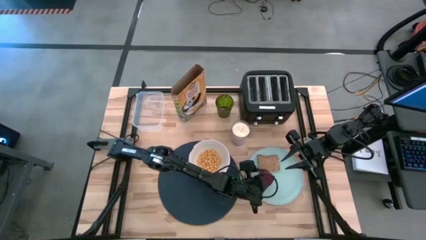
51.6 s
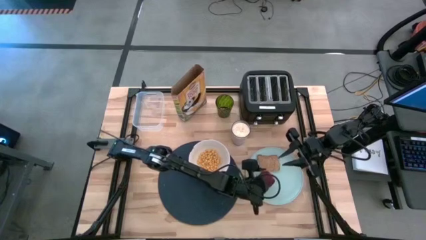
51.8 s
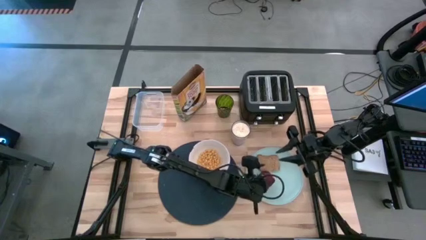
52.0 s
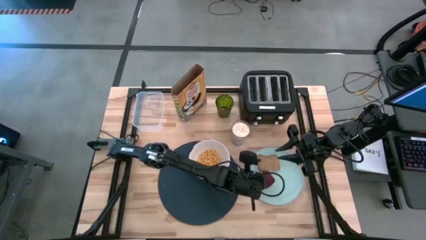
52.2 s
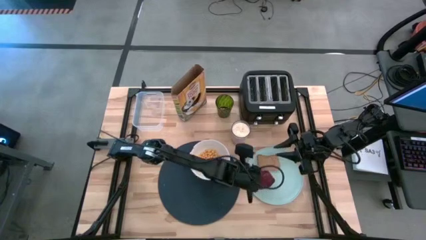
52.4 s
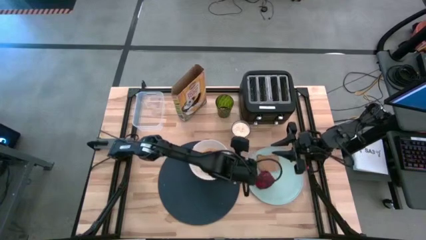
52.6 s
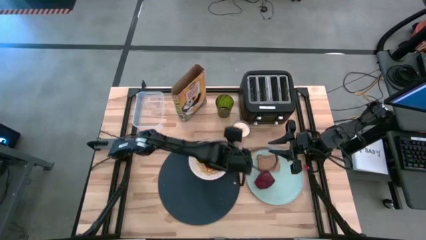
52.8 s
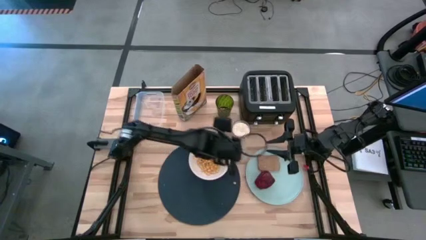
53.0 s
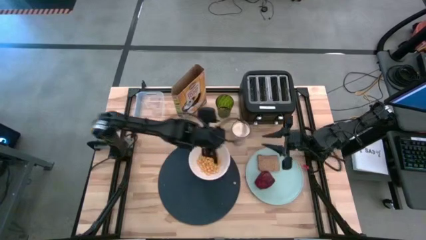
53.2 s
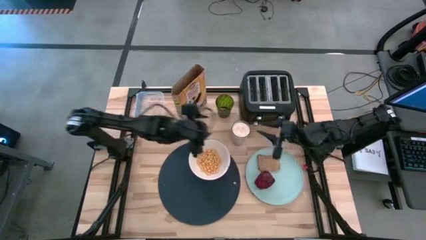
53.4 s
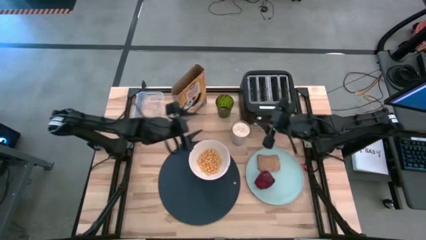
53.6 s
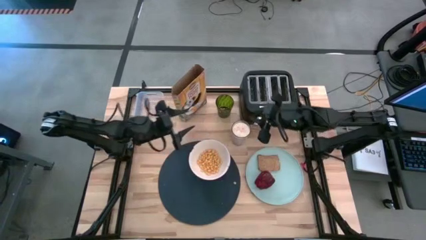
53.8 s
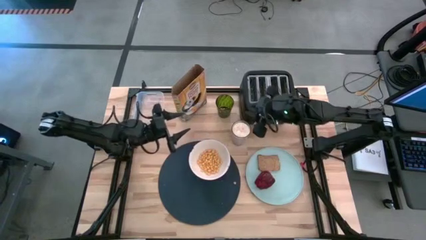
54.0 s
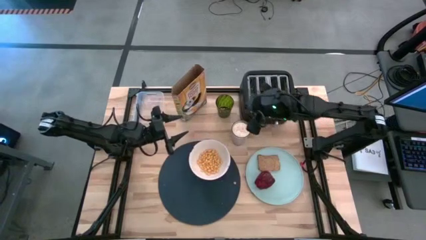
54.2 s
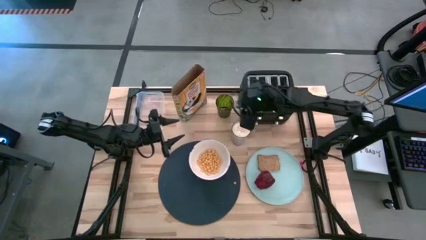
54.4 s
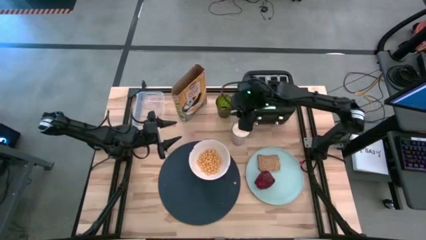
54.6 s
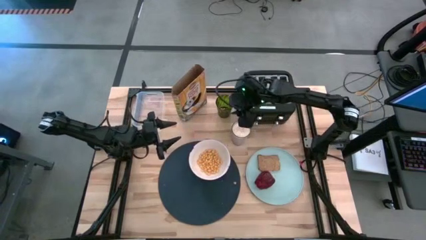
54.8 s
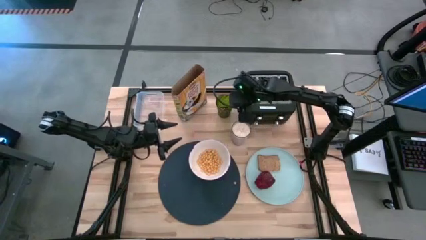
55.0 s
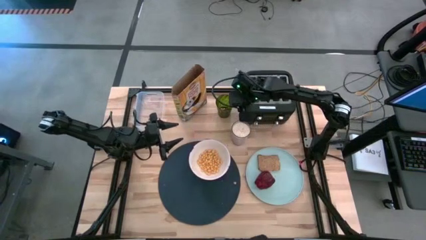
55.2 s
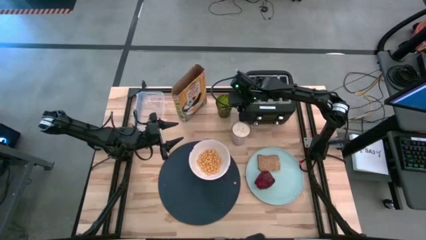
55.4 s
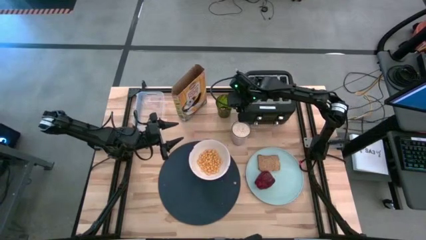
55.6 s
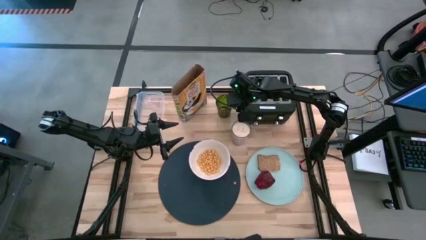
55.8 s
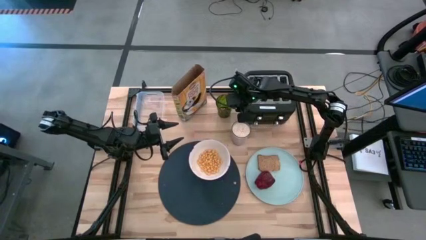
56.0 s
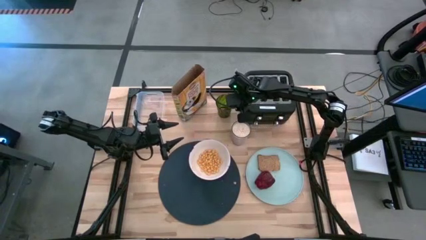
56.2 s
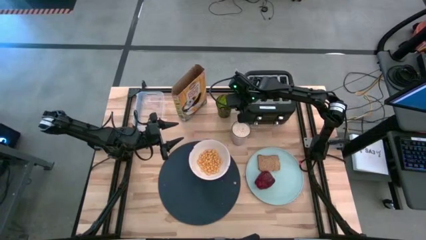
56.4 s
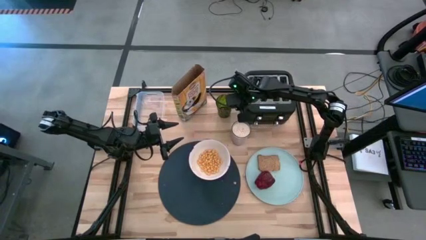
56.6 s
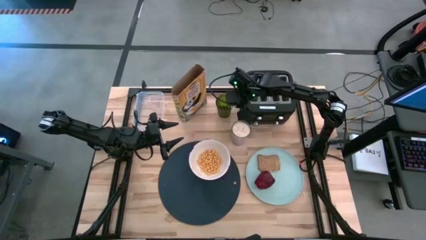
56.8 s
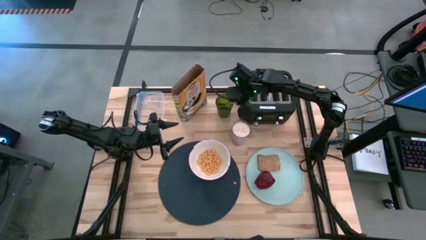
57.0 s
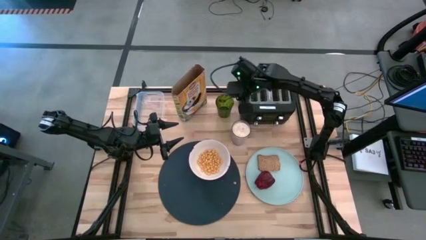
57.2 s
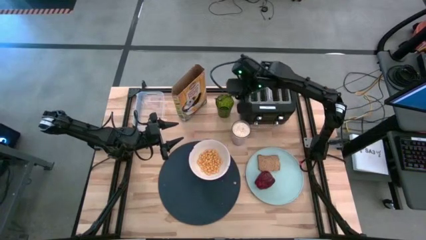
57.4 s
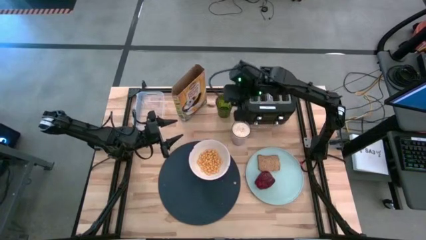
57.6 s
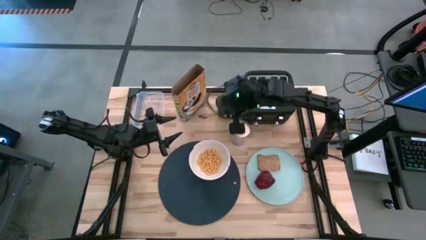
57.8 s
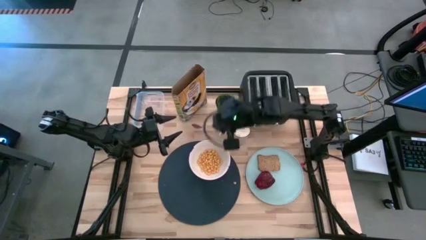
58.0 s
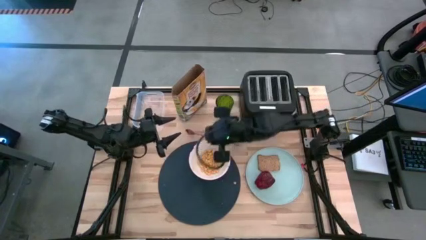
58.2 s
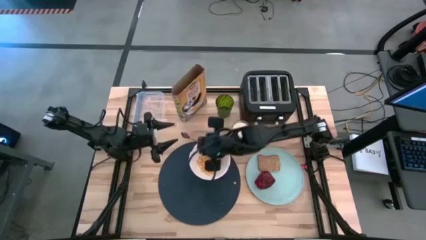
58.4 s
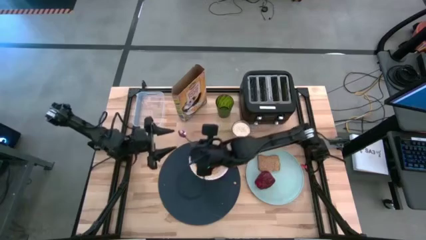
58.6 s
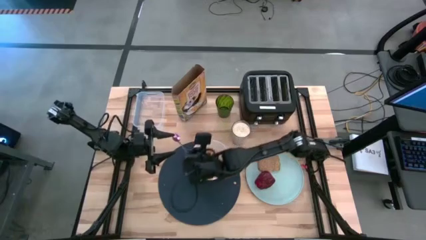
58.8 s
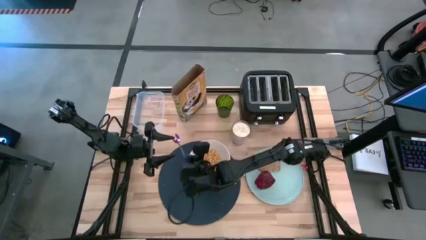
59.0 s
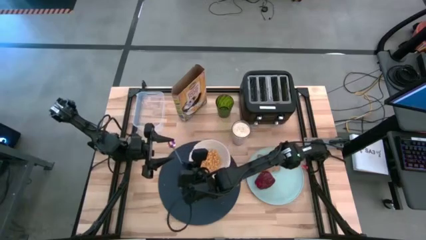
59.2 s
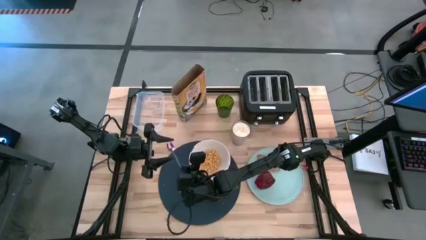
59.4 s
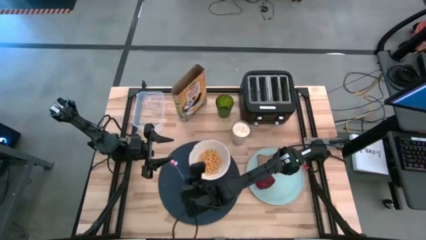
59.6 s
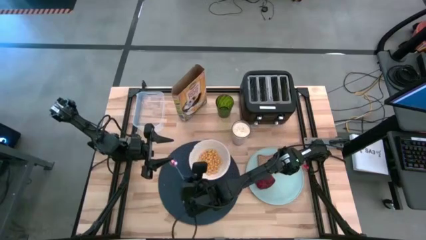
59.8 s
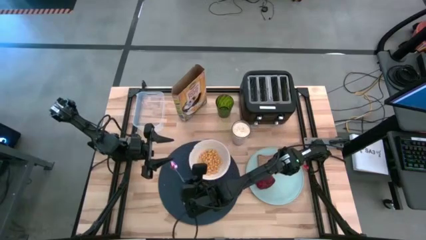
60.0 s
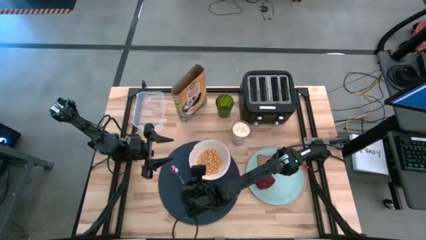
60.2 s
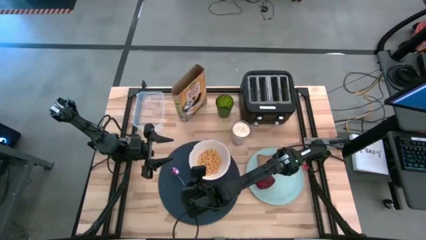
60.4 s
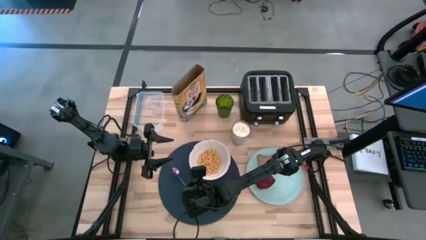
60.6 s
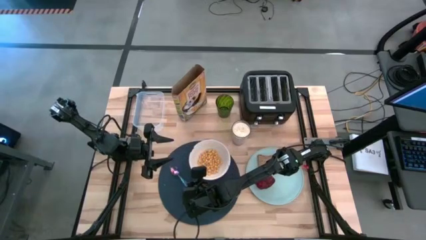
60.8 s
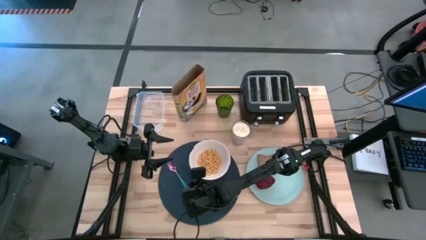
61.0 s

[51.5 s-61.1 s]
Task: Arrange a breakfast setting
Put the blue spoon on the left side of the white bowl on the dark blue table mat

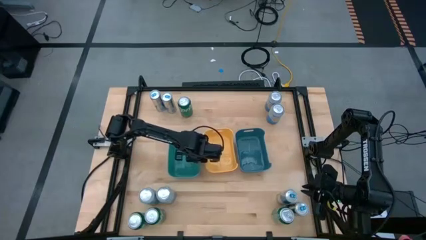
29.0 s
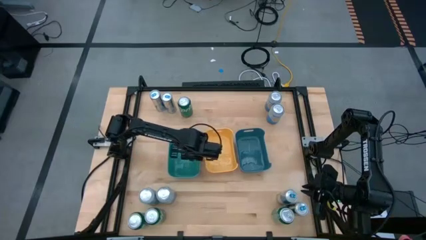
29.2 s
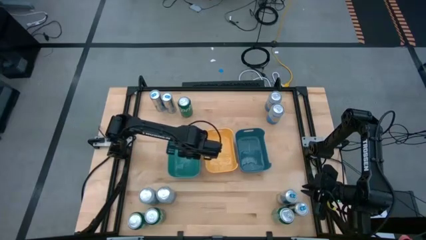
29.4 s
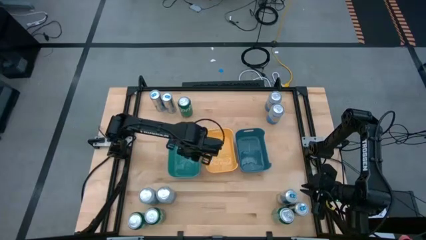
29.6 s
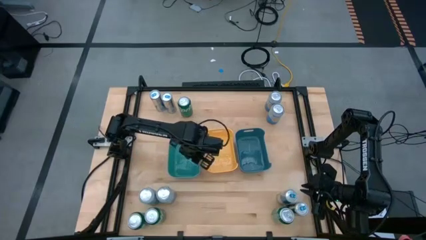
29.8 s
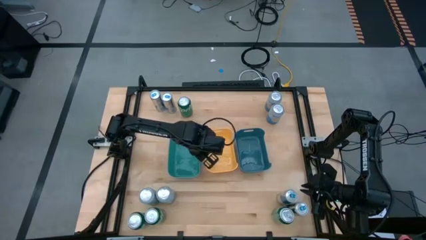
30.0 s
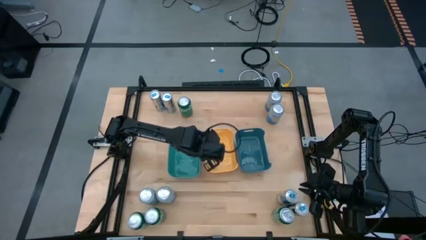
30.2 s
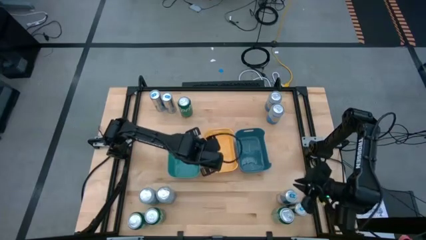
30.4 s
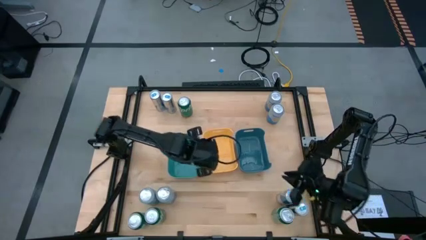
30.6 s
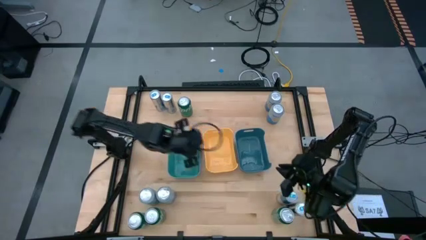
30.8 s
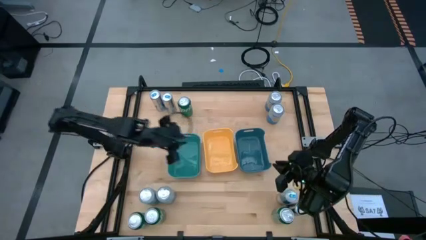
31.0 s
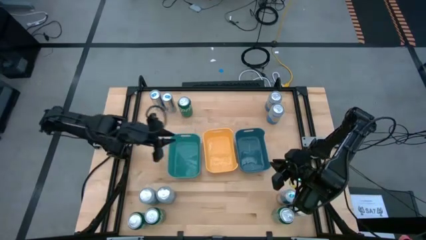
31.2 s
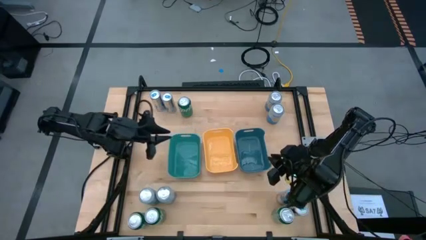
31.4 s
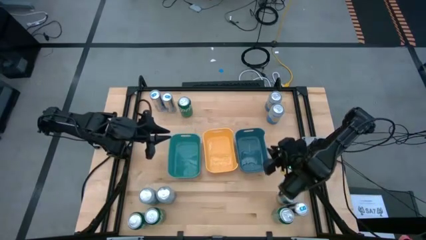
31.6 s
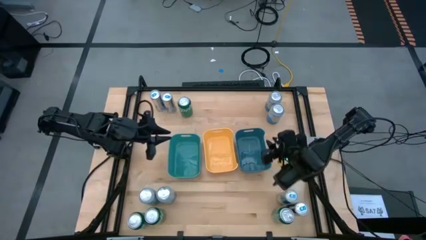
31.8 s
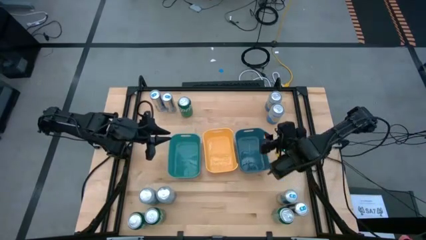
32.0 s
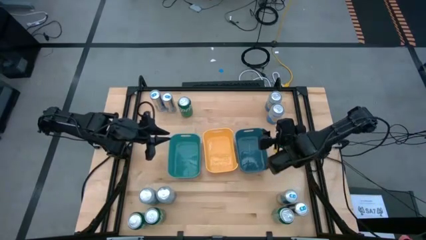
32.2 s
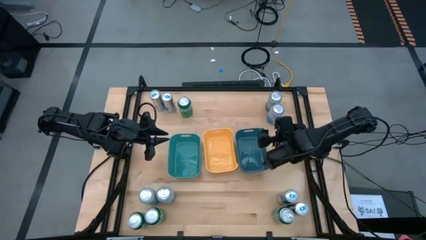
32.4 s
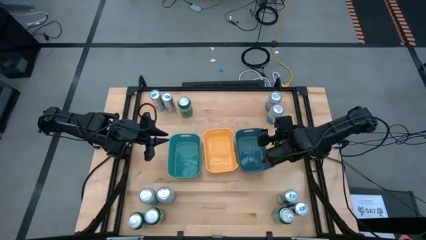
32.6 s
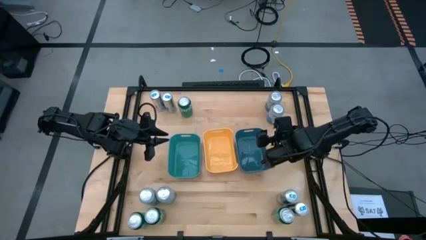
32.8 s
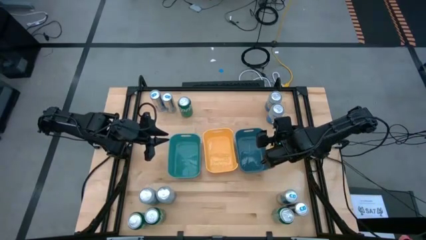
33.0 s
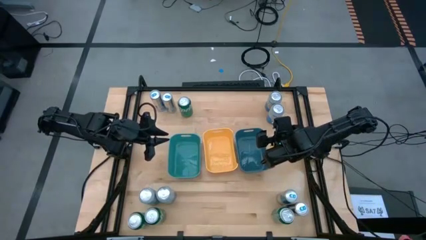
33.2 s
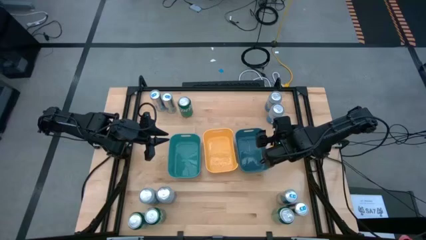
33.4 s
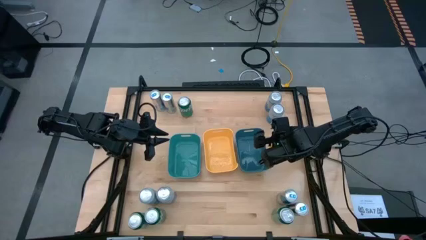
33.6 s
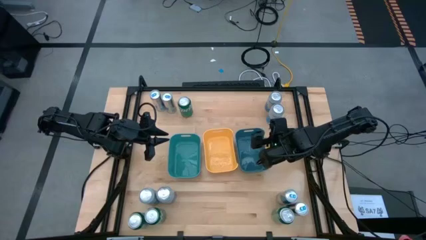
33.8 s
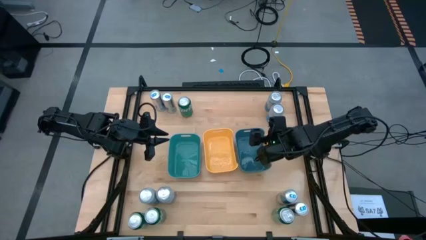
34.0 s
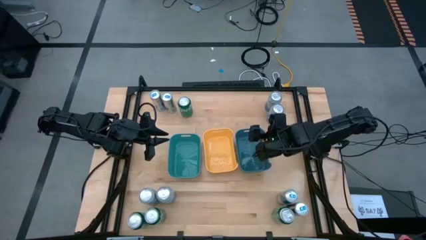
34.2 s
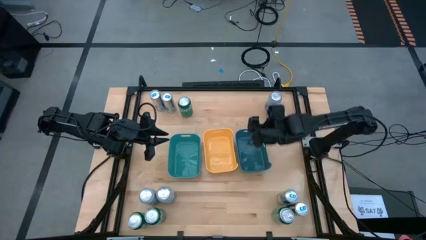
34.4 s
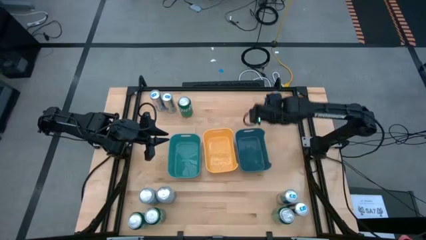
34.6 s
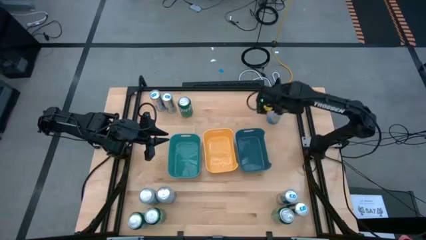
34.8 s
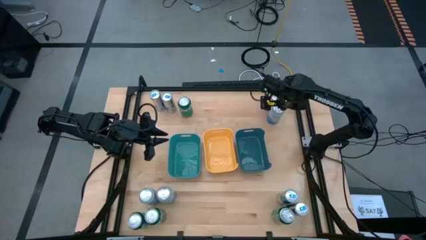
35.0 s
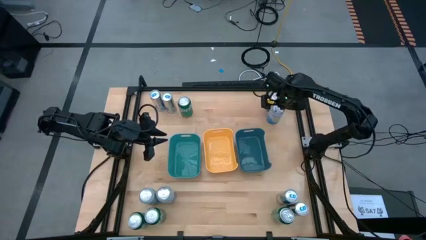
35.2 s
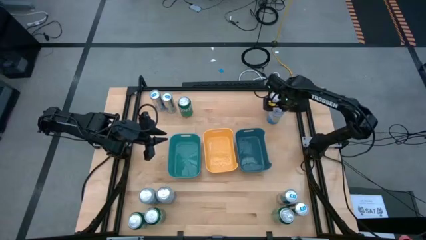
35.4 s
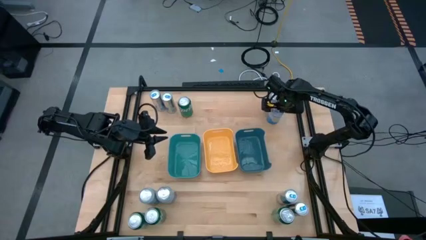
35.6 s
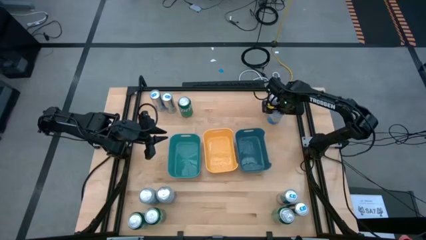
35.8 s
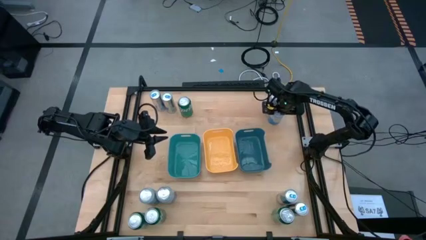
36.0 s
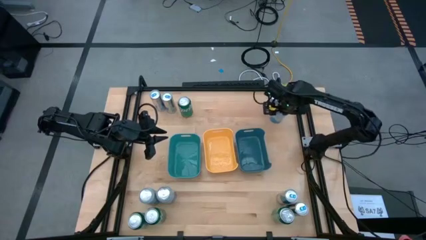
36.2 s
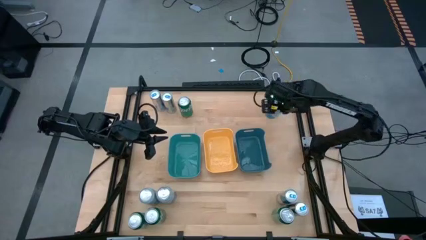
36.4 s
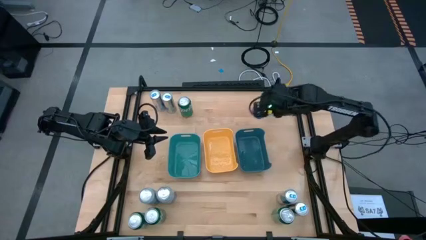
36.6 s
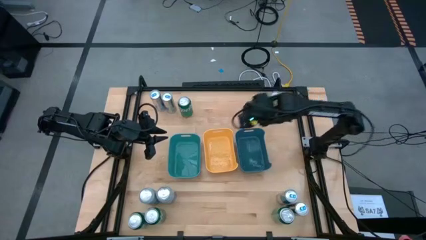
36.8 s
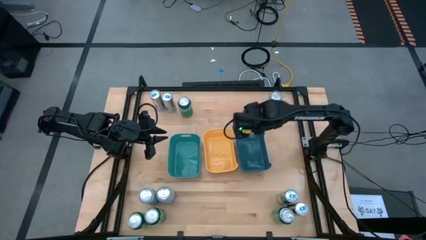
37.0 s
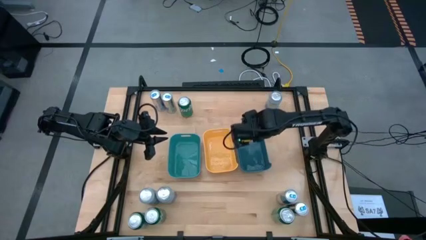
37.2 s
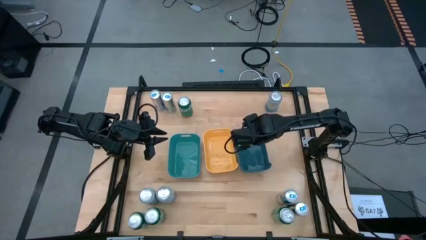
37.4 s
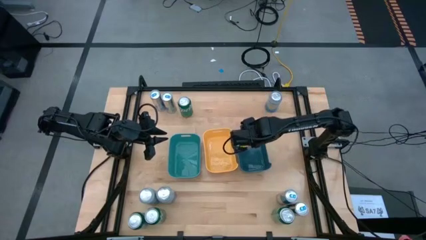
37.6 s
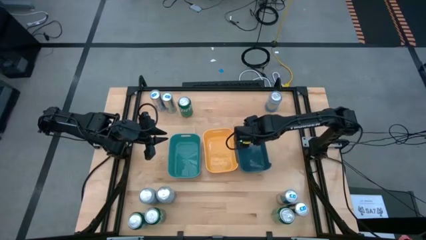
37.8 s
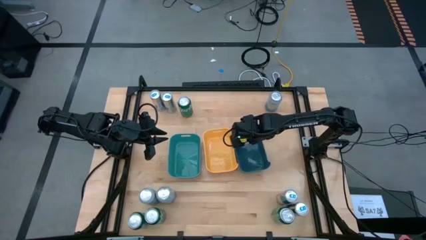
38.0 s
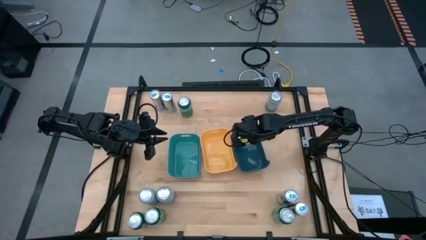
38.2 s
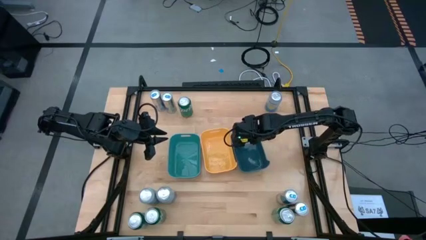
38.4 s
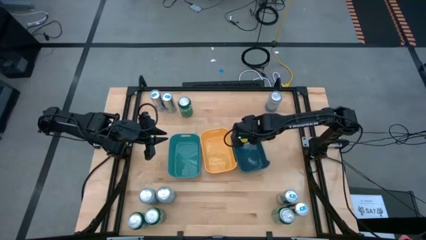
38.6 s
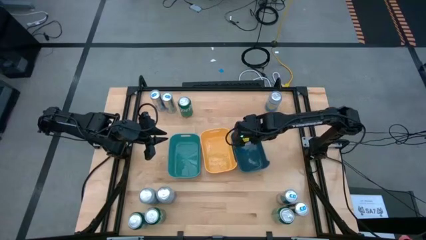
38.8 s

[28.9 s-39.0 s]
Task: Sort soda cans
Put the blue and white soda can into the dark blue bin
